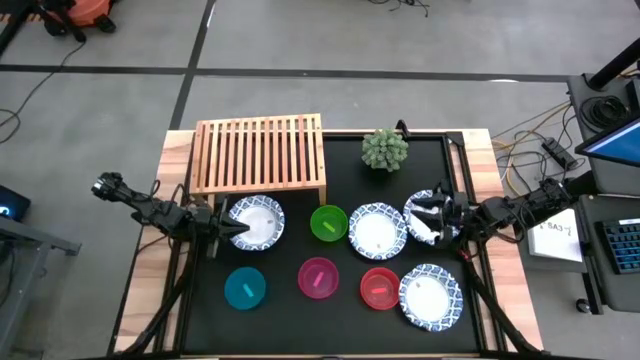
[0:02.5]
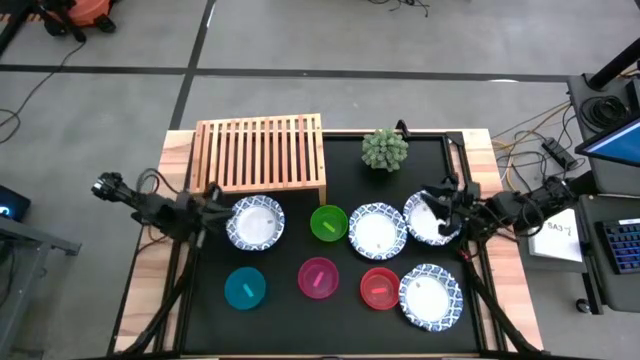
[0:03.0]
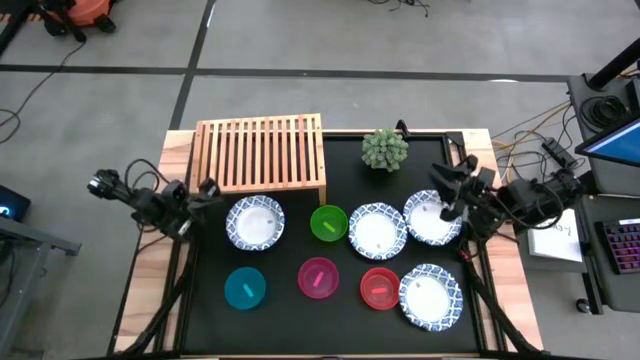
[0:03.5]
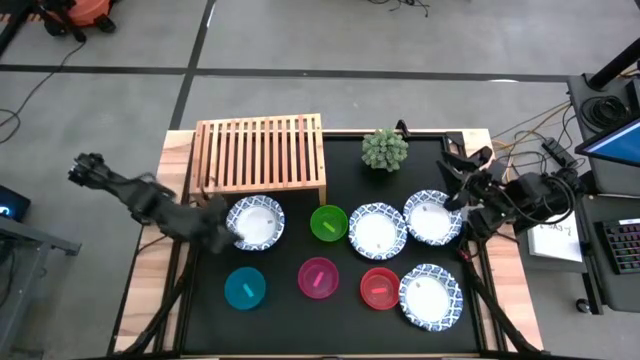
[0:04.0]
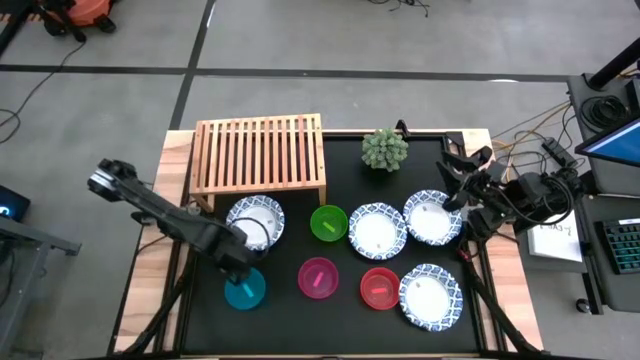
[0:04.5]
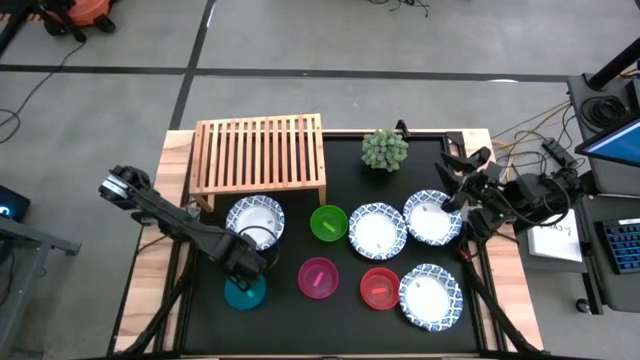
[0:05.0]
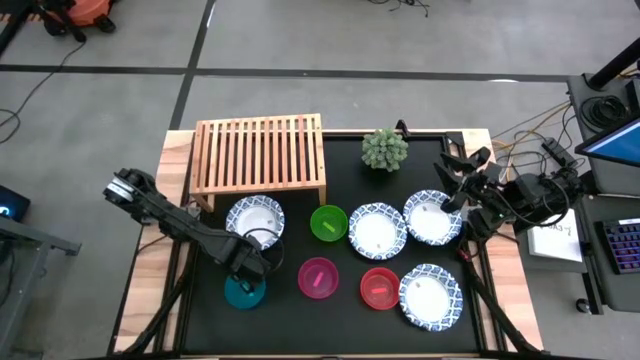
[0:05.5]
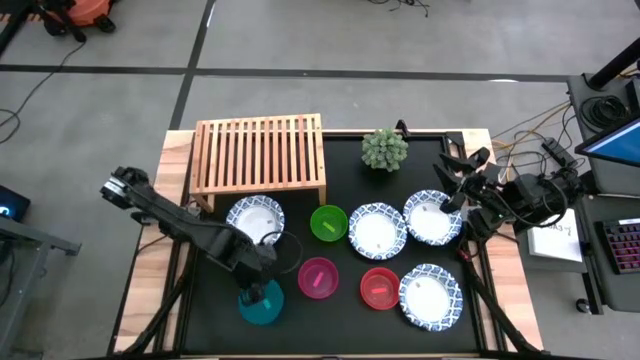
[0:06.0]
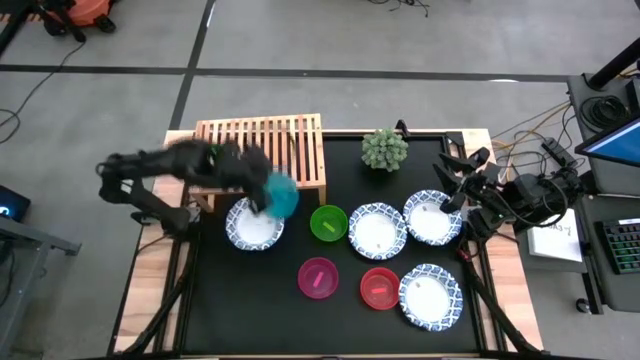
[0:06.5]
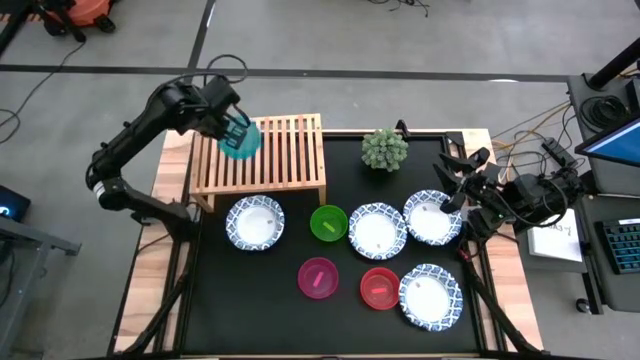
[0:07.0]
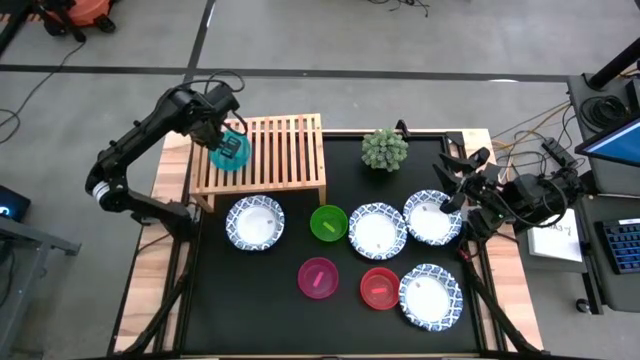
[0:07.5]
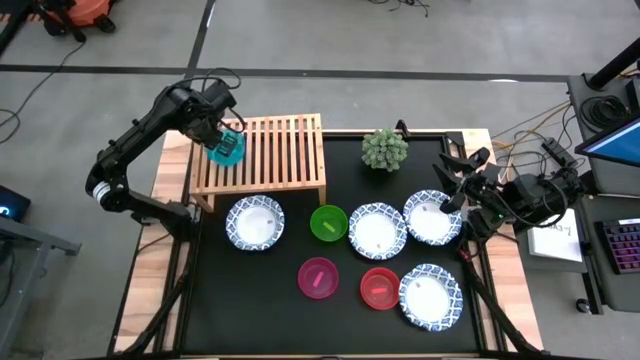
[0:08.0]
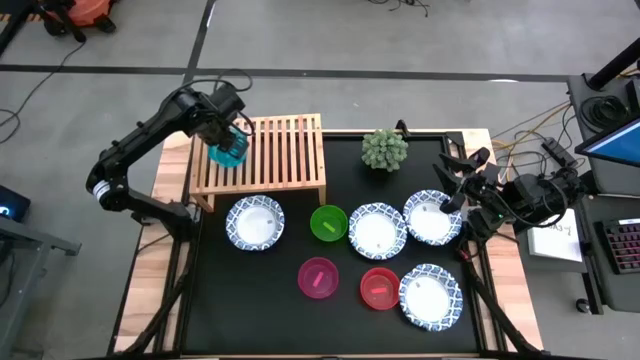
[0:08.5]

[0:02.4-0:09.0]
Task: Place and stack bowls onto a shelf
Put the blue bowl on the shelf

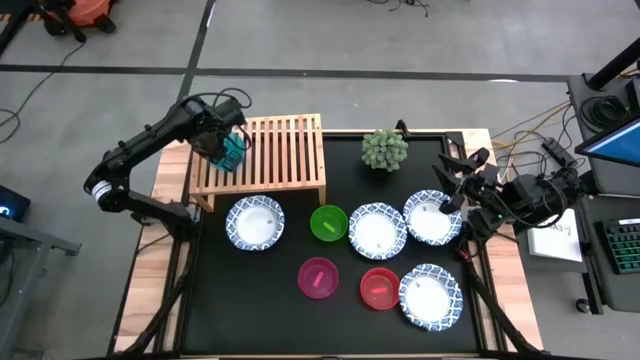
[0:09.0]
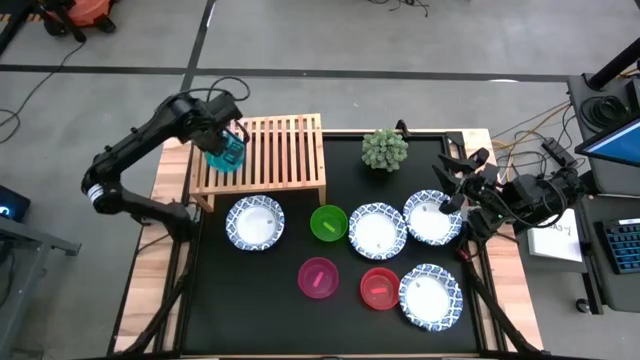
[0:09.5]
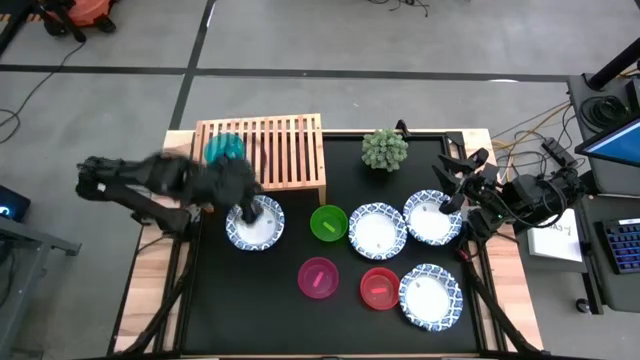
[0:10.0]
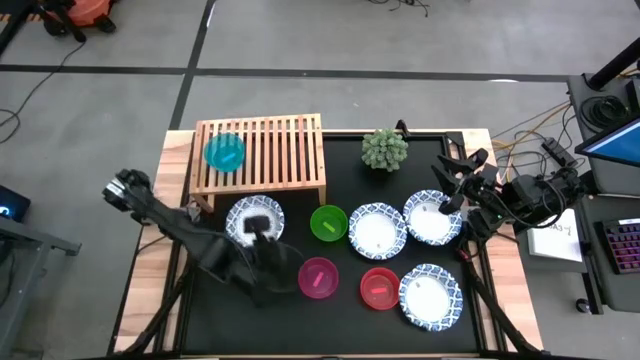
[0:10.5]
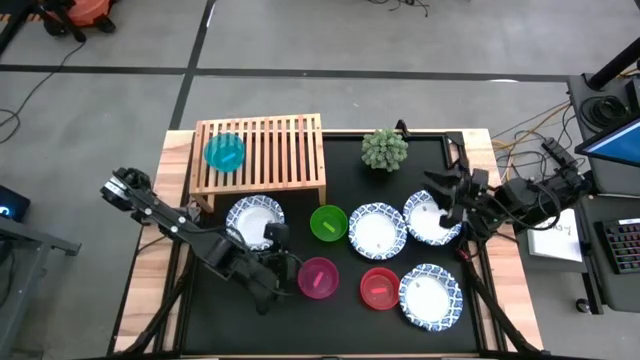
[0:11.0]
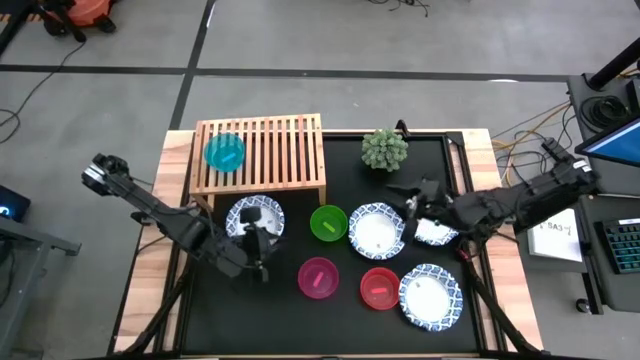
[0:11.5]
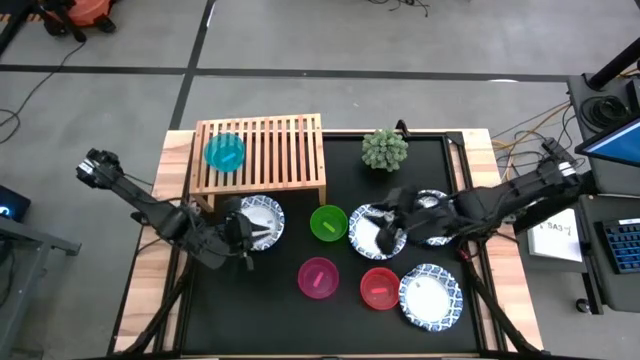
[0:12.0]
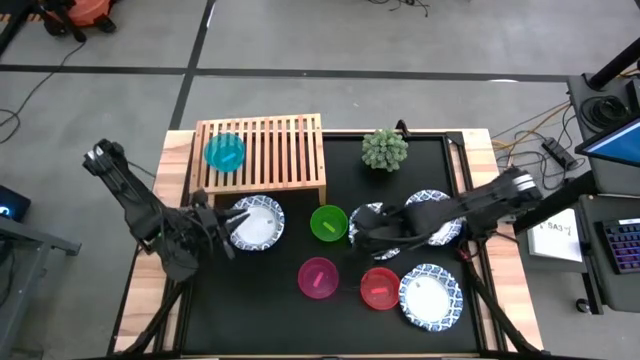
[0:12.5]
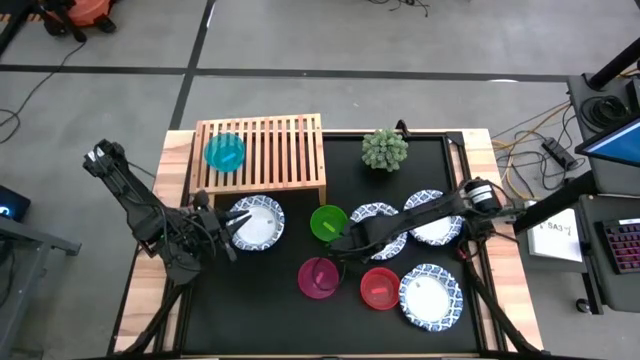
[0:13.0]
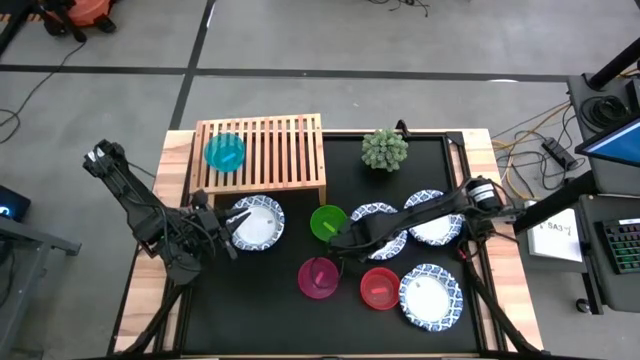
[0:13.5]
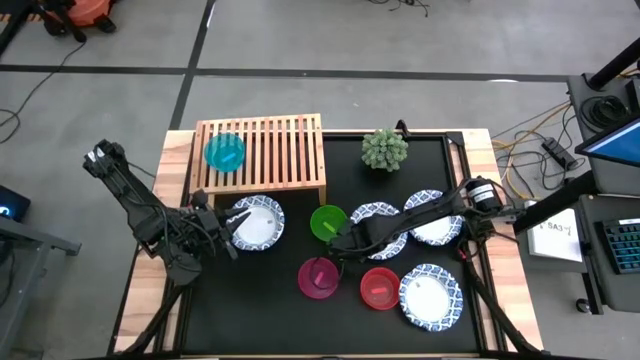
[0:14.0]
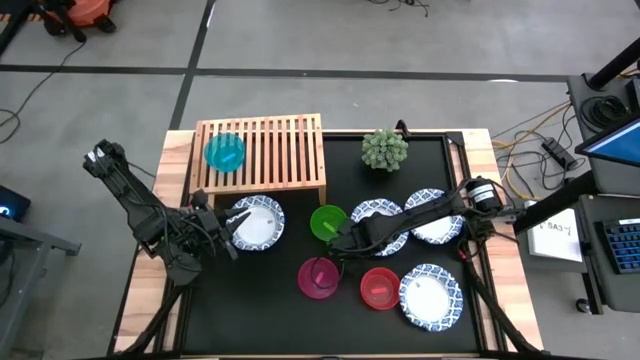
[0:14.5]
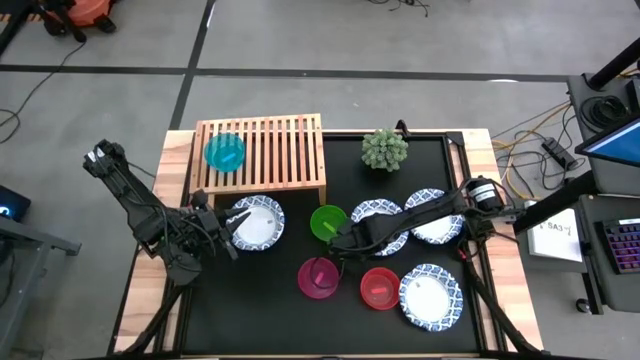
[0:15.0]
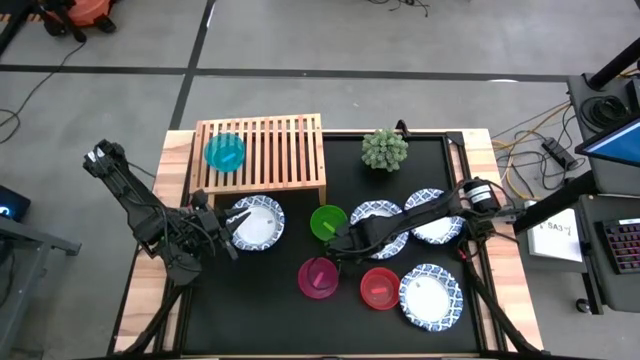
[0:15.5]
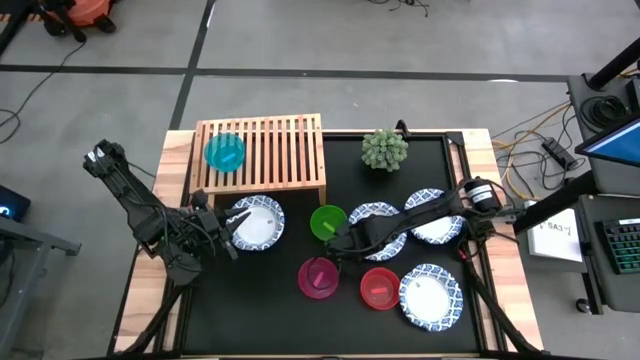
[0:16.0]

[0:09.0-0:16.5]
Put the white patterned bowl on the shelf

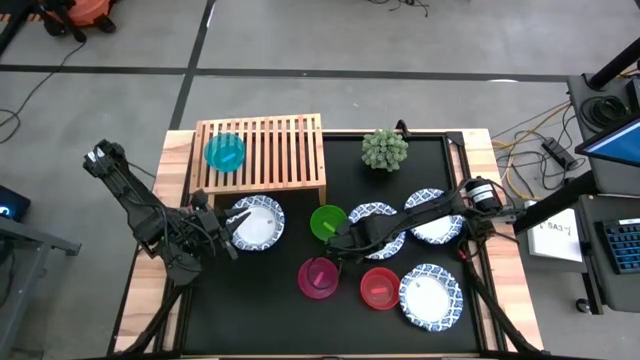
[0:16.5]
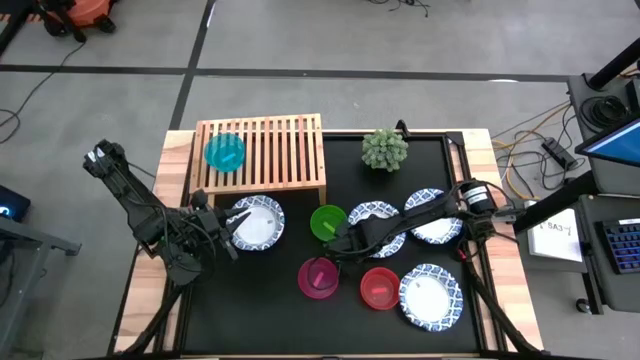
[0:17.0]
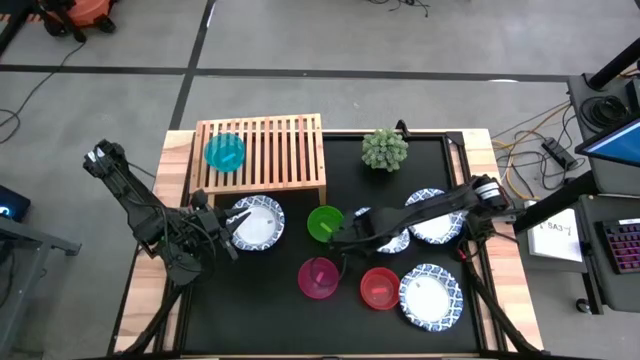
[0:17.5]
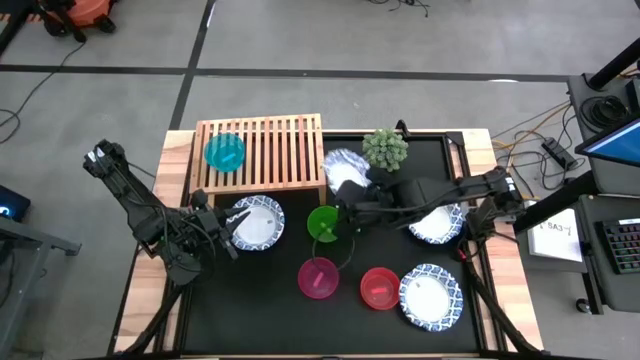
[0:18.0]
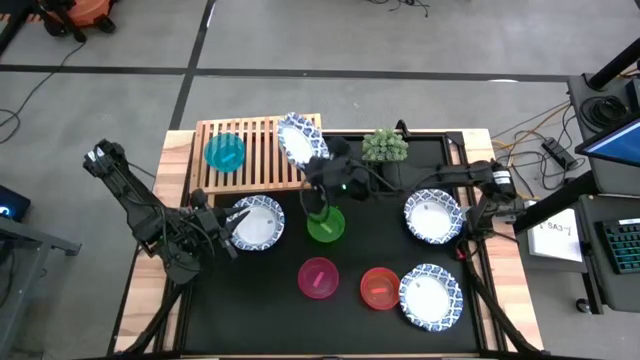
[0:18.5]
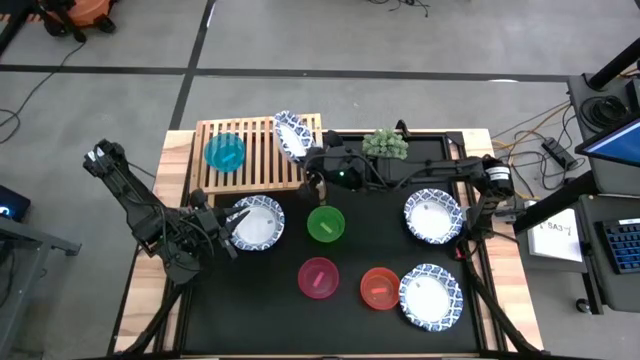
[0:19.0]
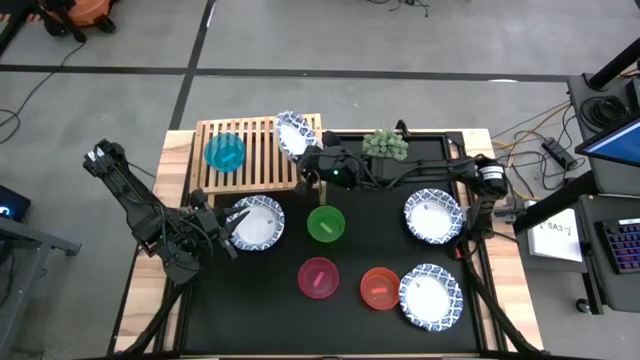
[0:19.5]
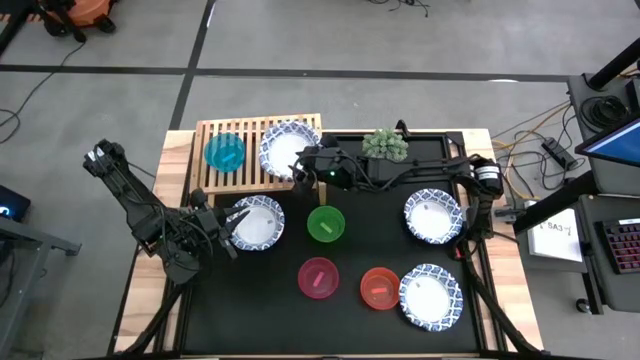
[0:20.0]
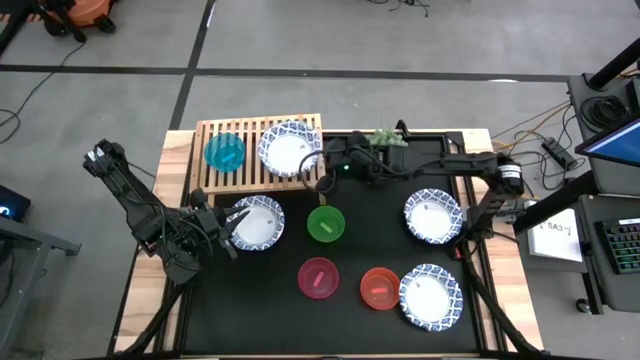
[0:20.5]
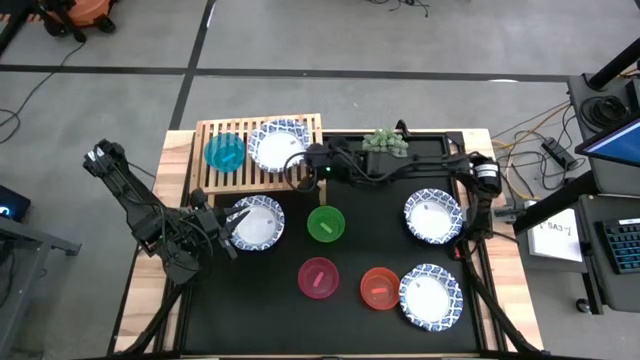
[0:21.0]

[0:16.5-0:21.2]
Put the white patterned bowl on the shelf

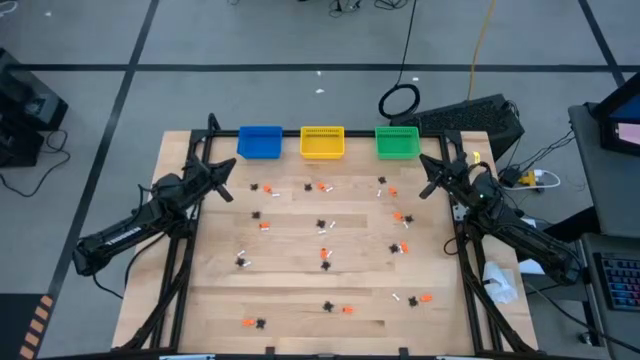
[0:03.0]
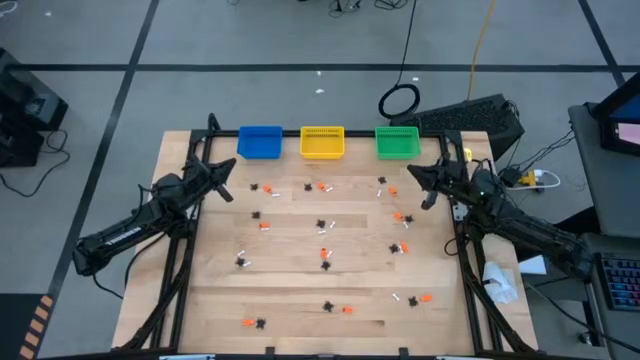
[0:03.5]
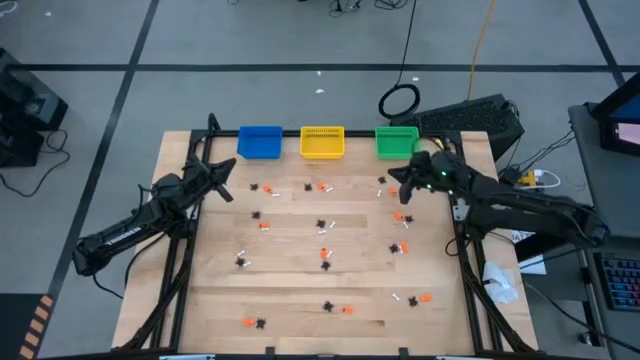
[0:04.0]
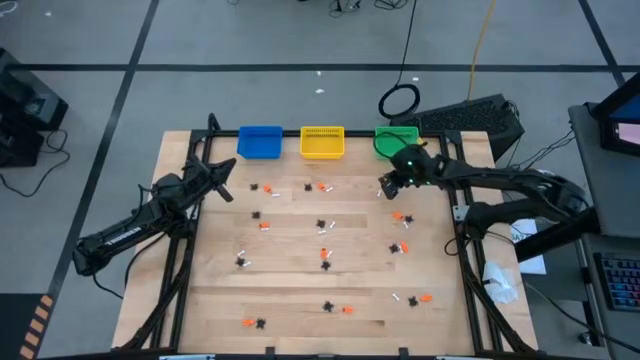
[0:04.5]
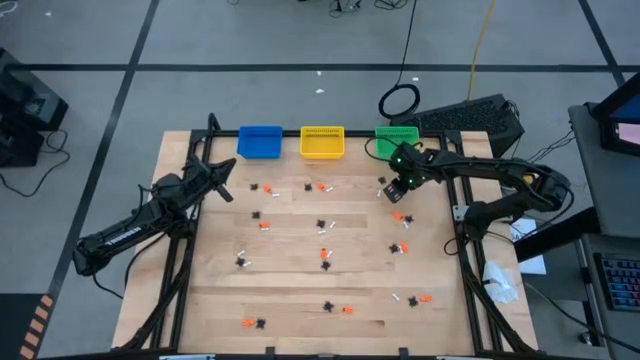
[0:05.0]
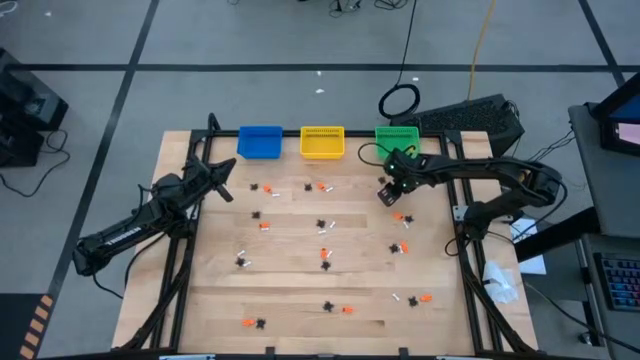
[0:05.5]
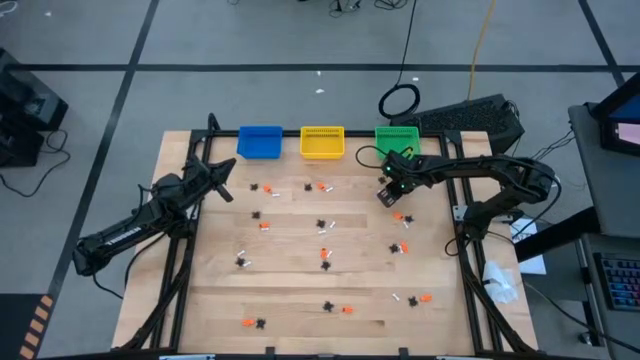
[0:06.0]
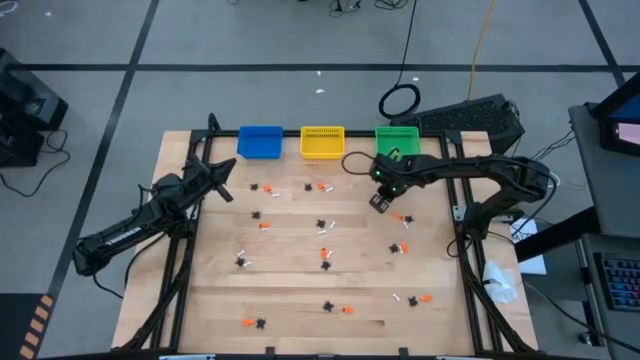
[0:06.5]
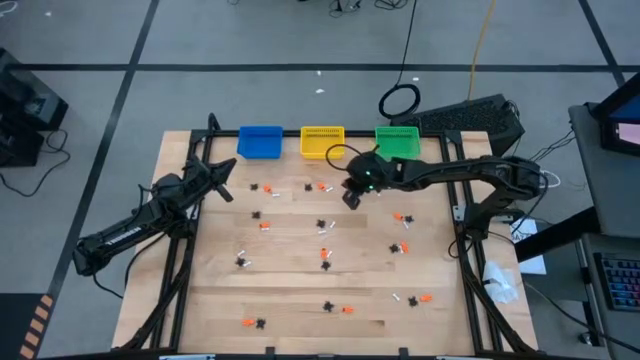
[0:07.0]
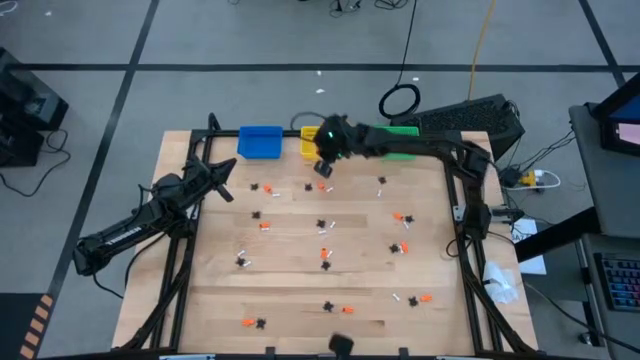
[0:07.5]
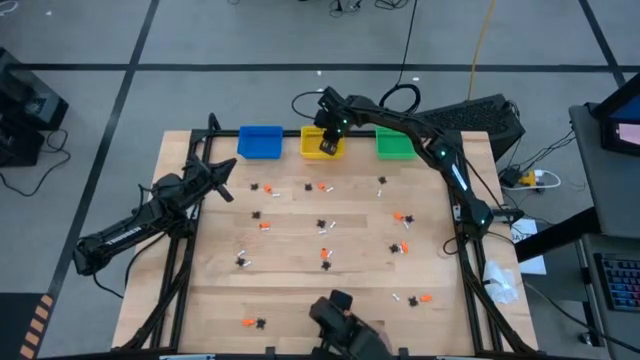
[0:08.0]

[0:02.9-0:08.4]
Task: Sort Halloween decoration
Put the orange skeleton toy into the yellow bin
